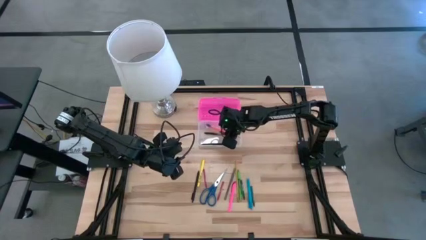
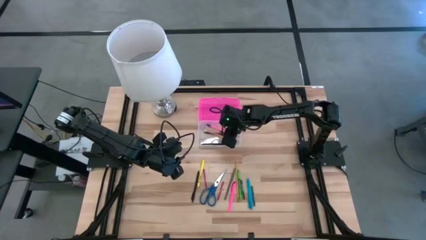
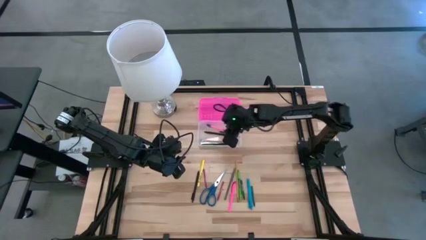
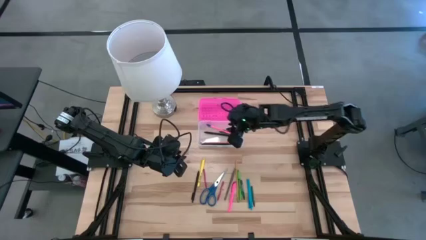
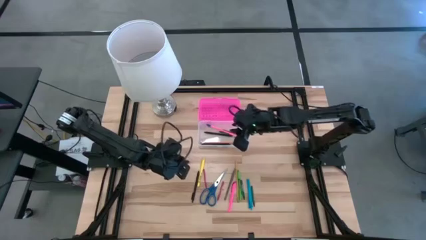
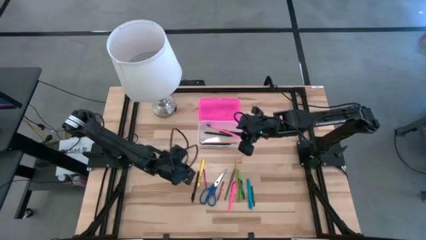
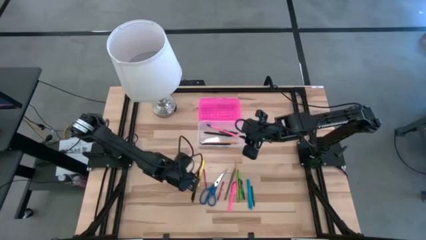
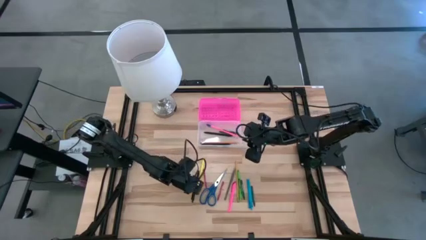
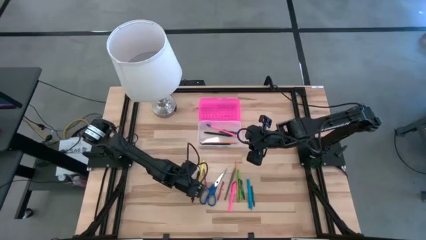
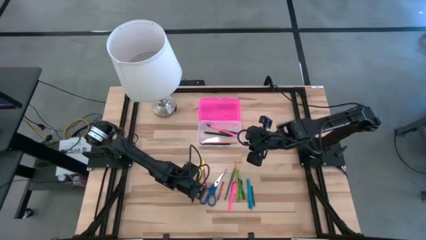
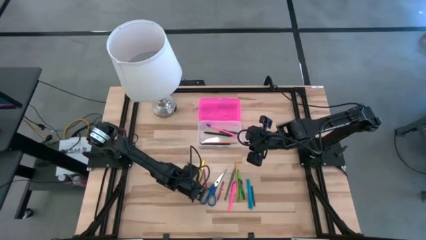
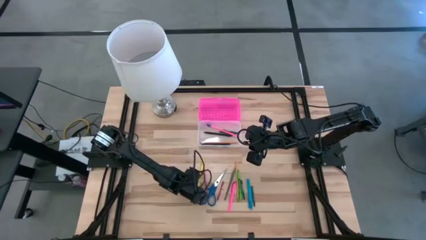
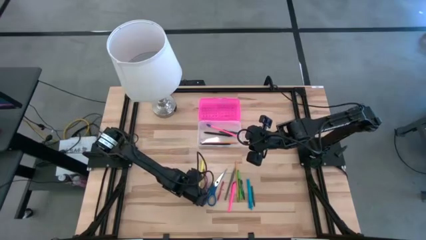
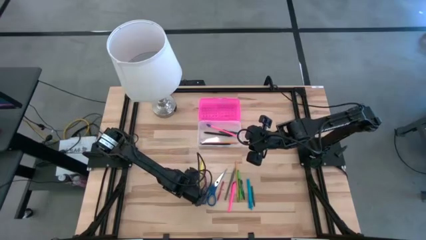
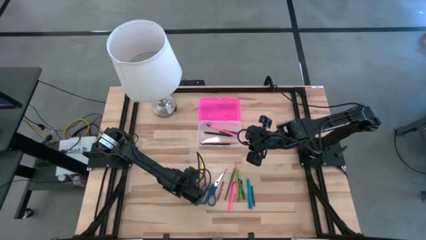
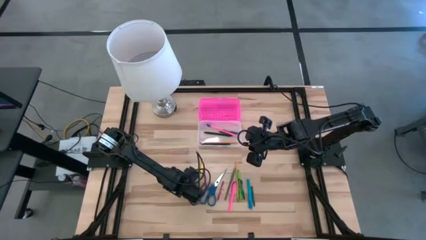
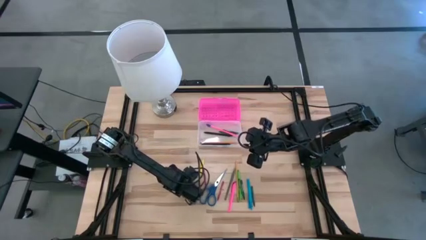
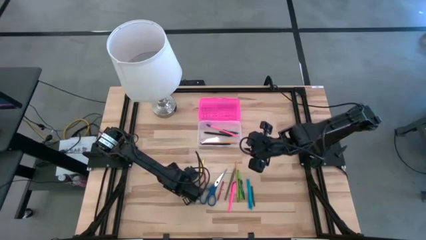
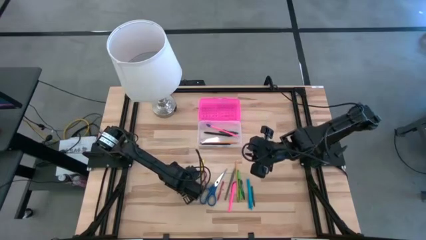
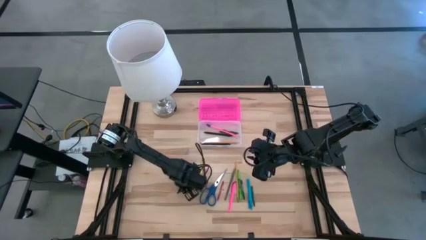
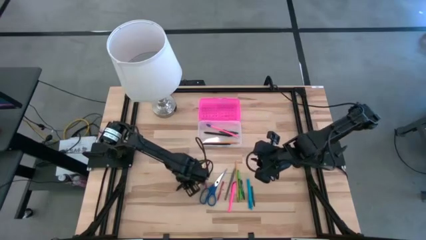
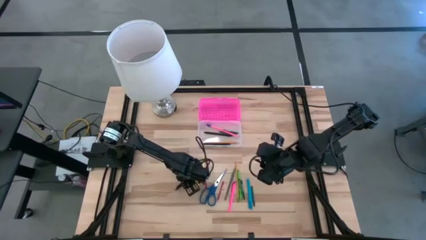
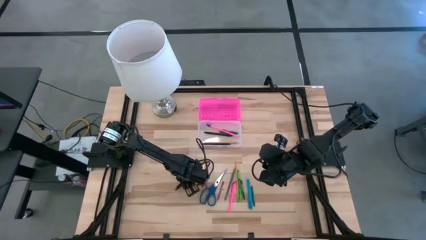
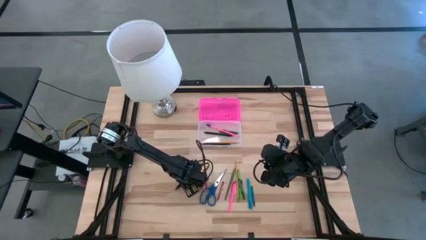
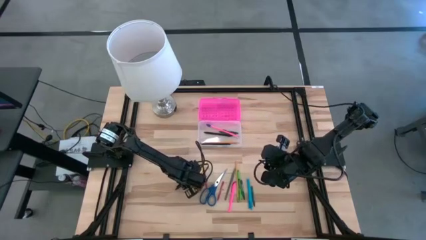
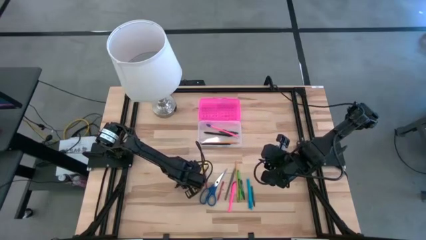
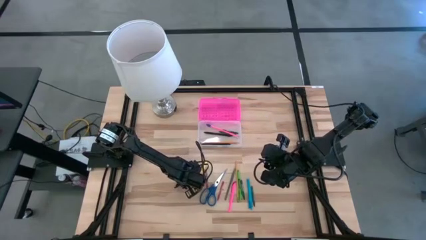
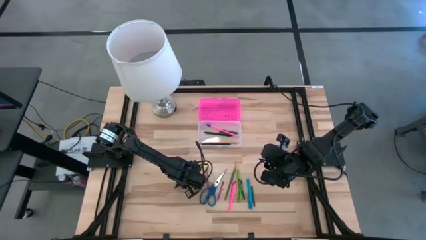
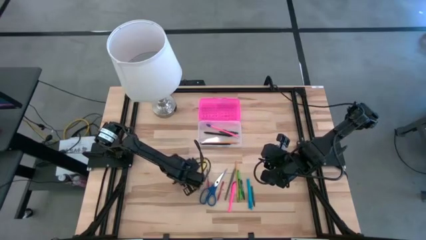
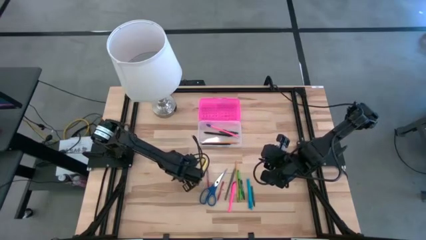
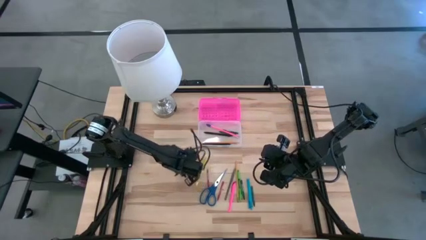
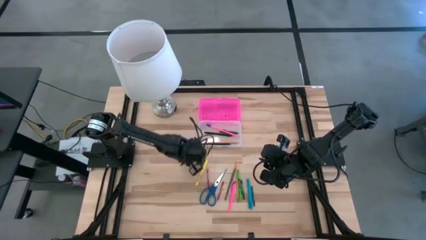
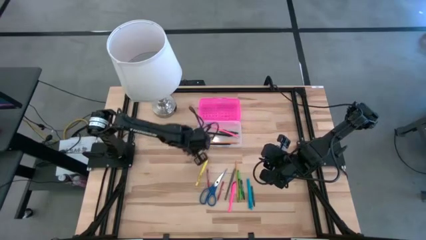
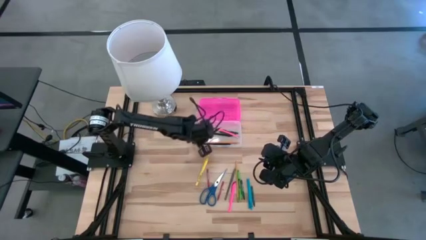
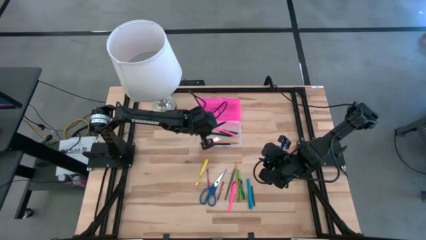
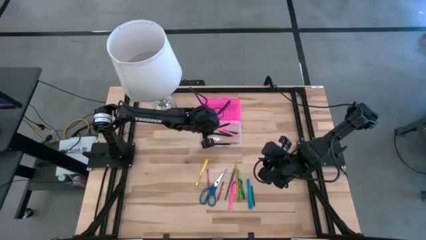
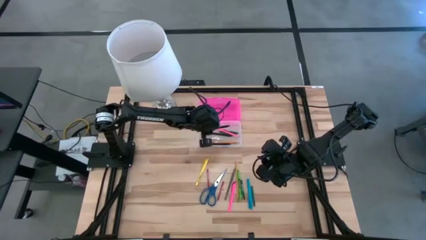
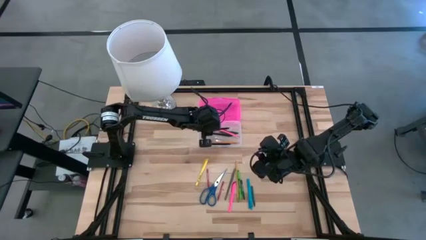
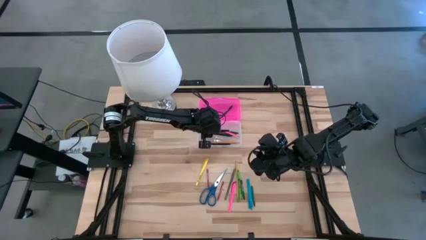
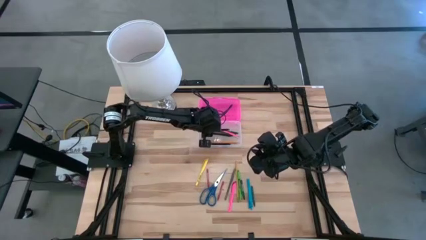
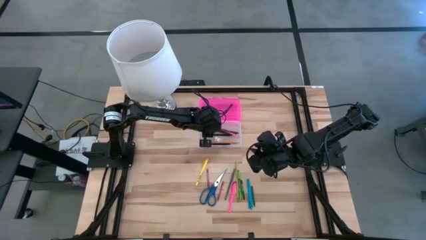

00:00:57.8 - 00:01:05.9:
Task: Pick & place school supplies into a supply box
Put the black pen into the pink supply box

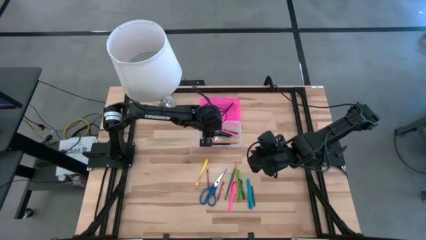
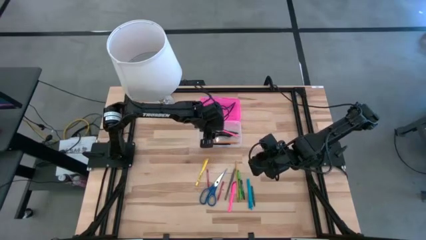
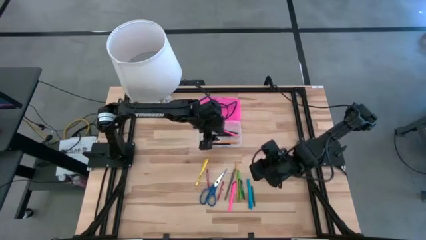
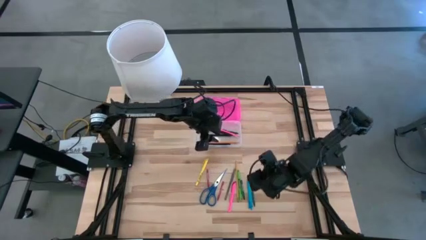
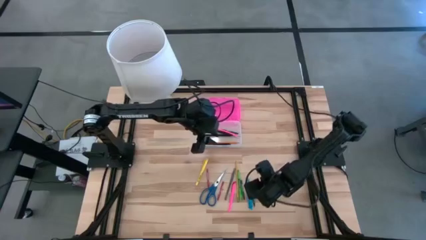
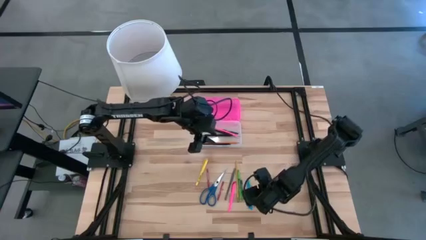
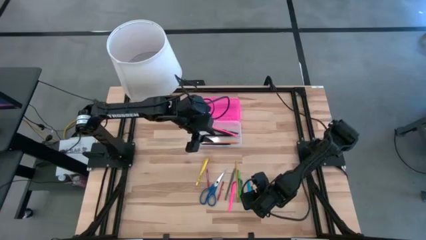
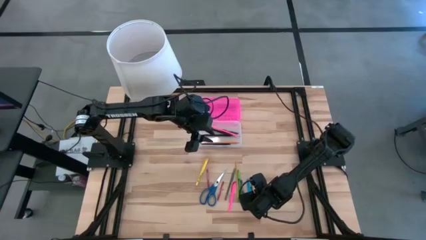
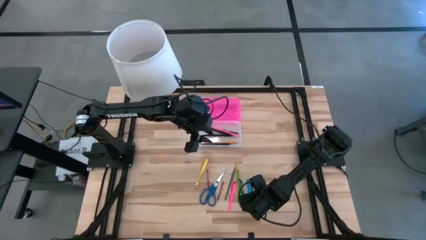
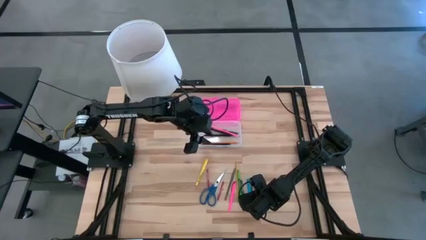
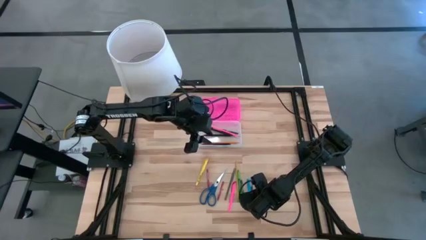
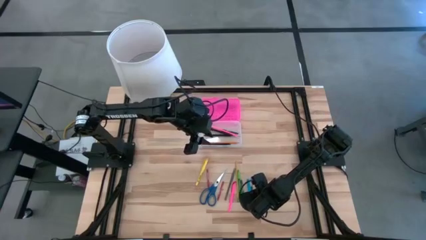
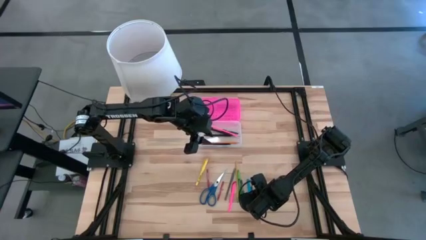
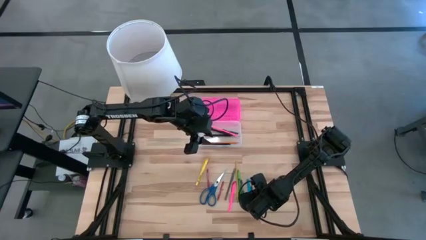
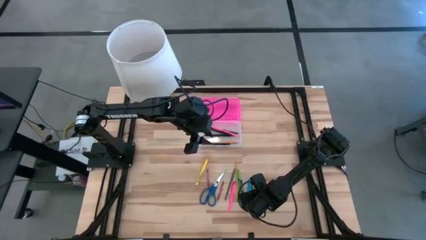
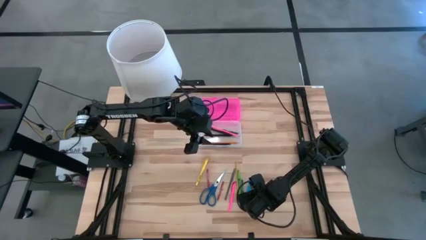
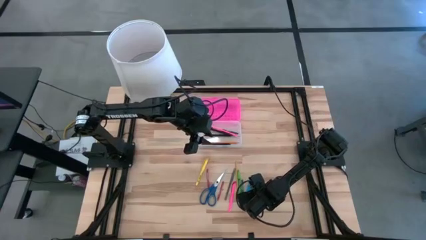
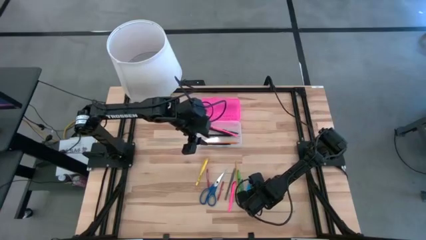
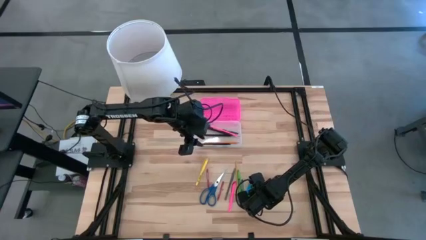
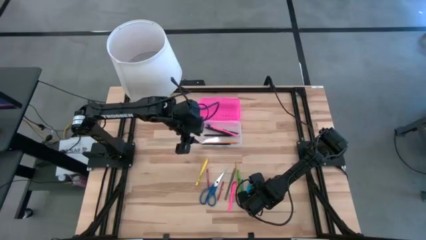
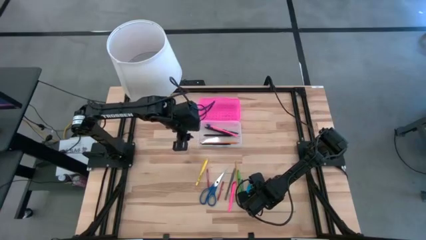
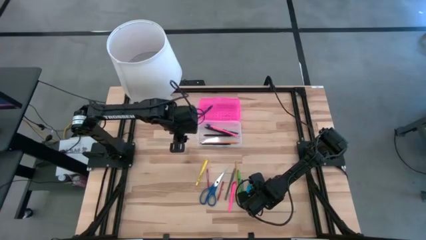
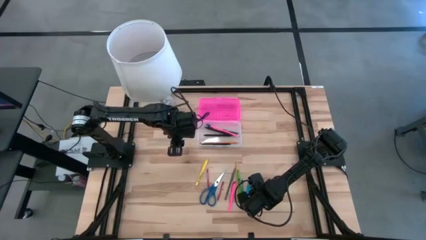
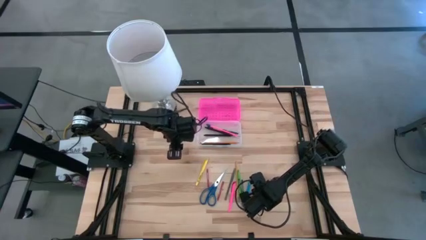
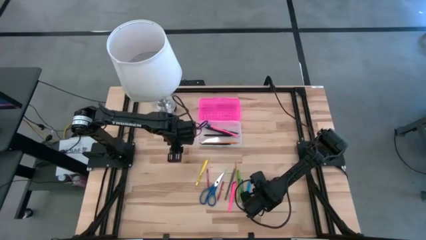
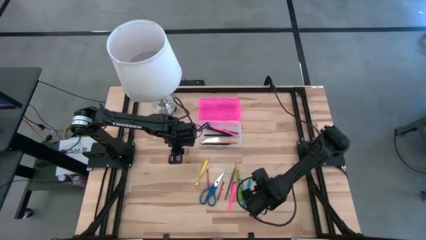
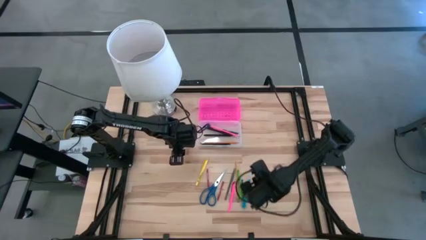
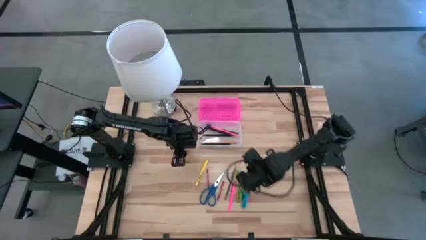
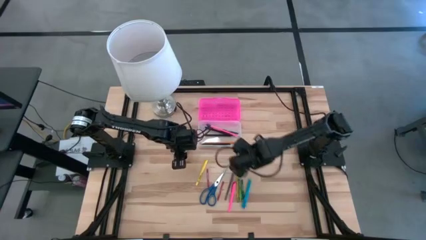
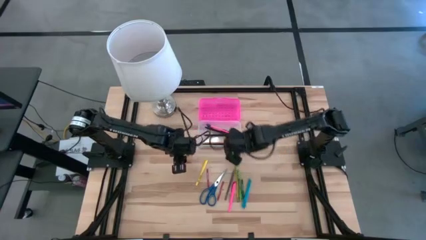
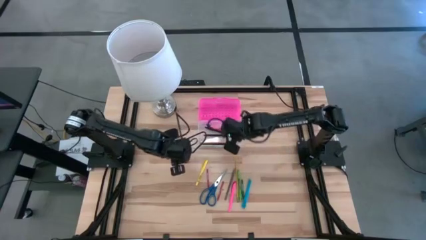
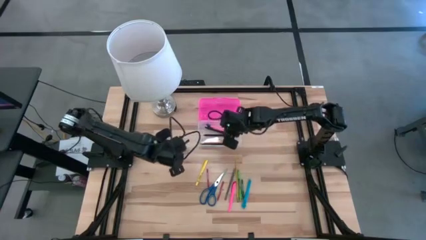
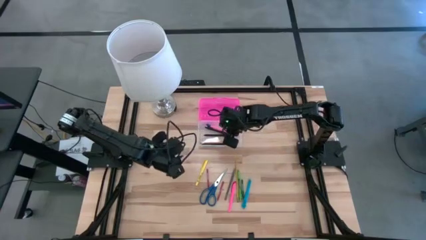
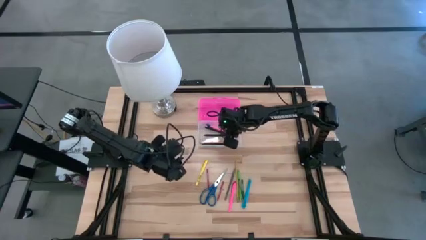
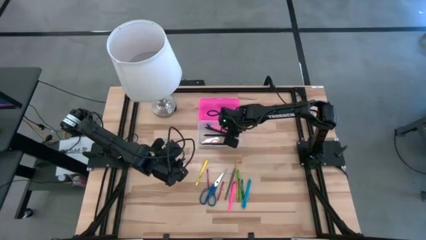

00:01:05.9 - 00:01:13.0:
Put the right green crayon into the pink supply box

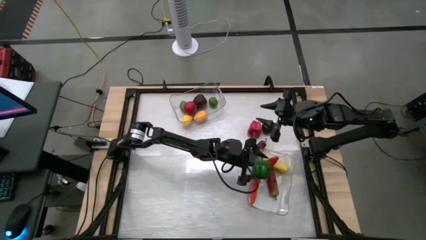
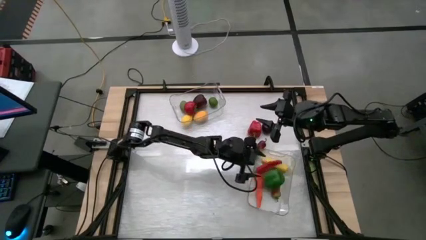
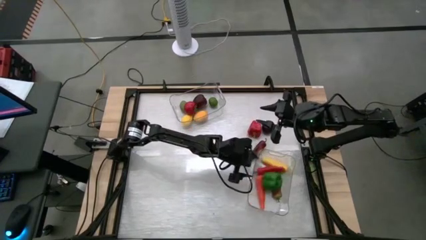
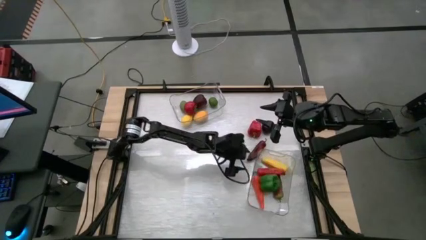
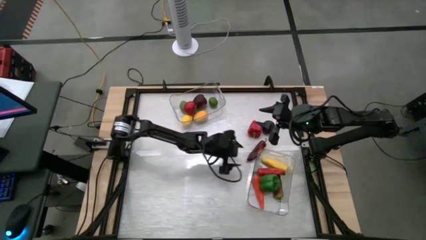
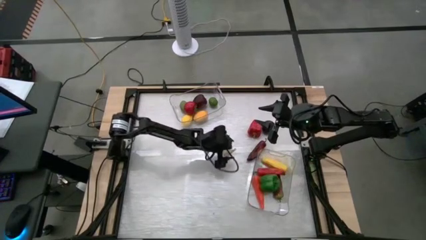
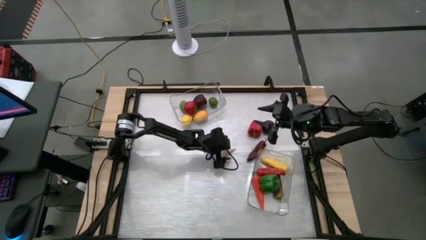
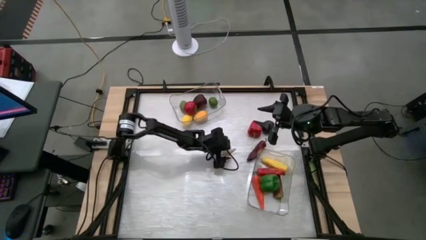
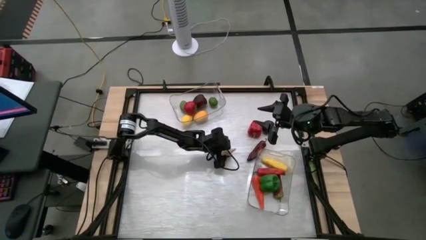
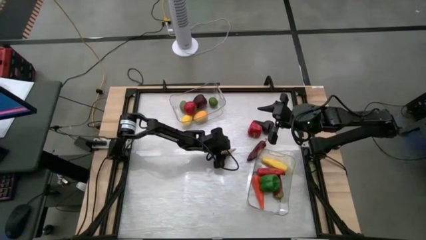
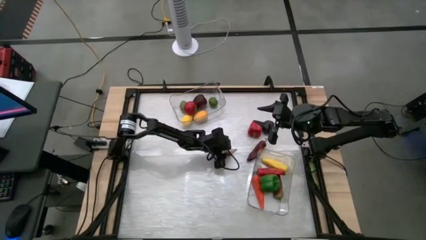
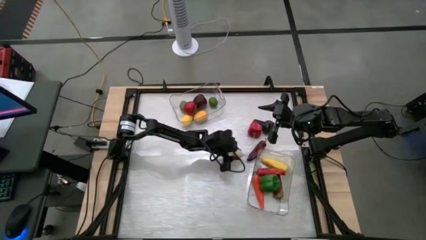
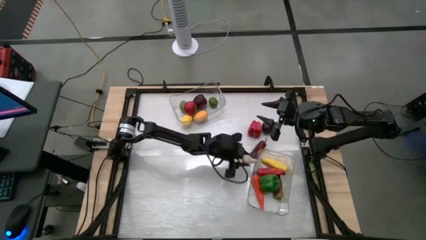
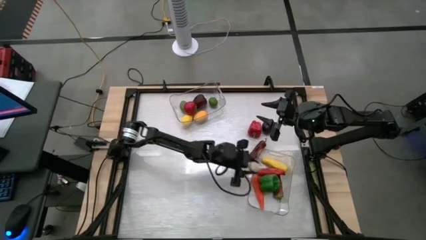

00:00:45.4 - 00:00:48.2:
Task: Sort produce into baskets
Put the garlic into the bottom transparent bin
